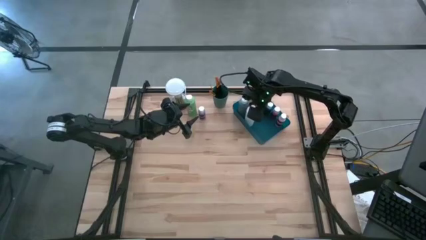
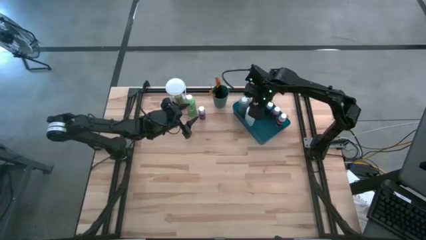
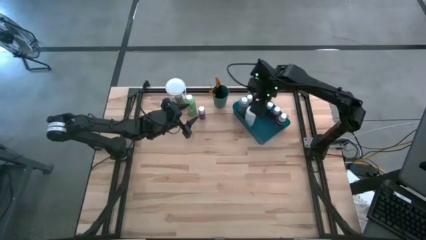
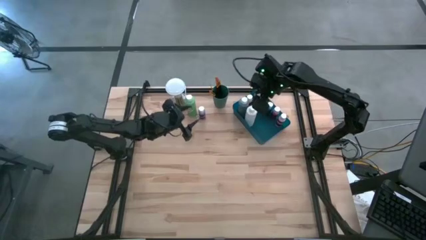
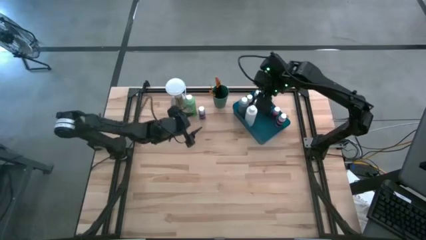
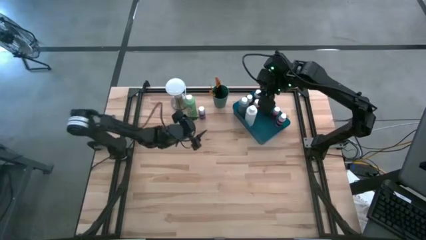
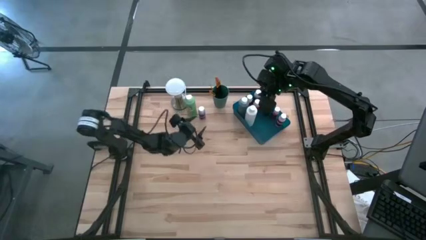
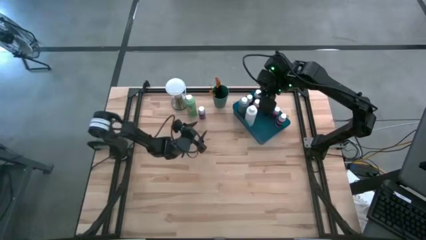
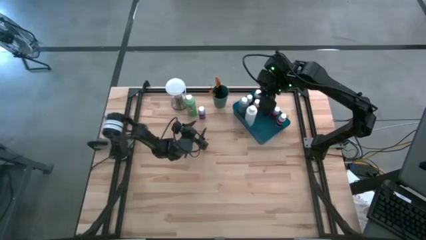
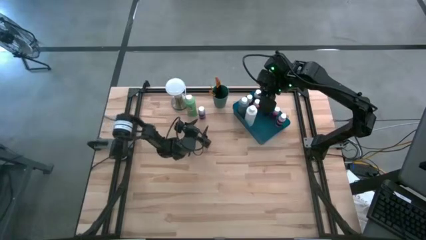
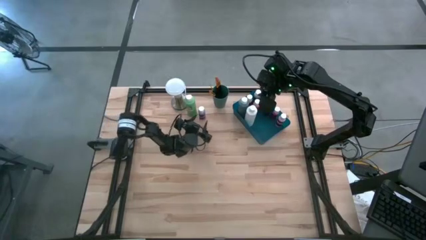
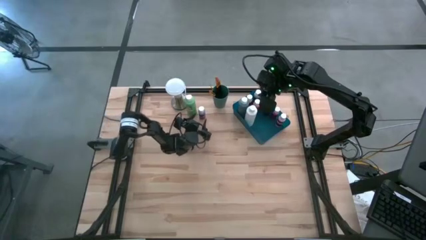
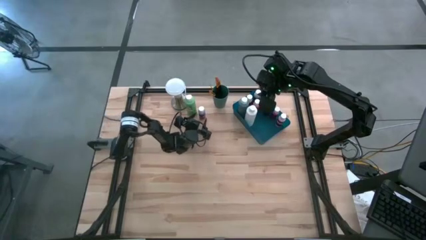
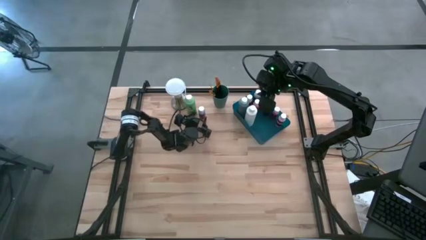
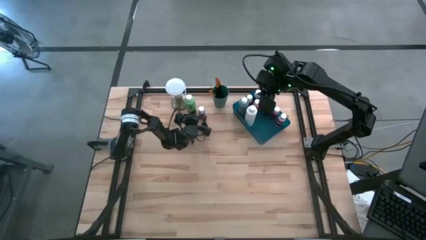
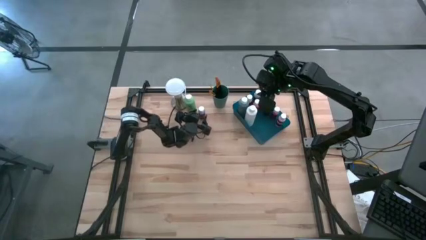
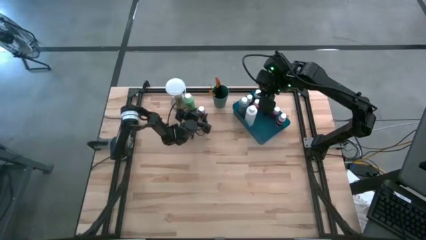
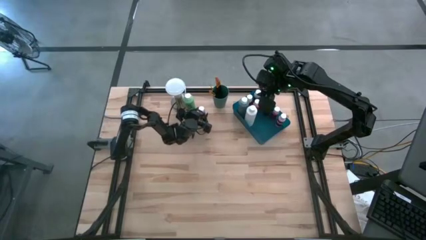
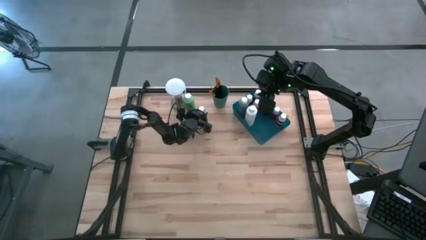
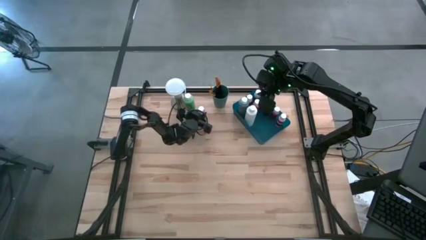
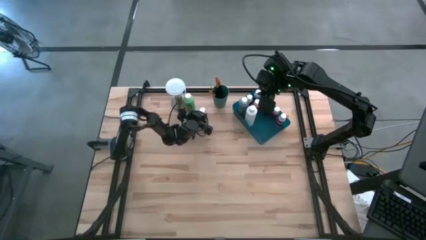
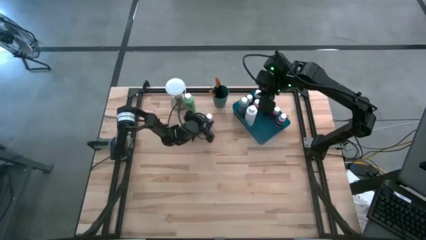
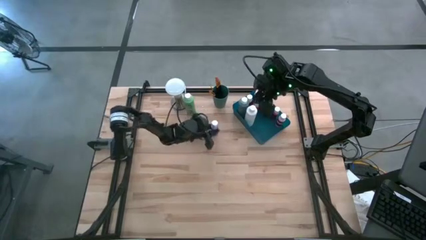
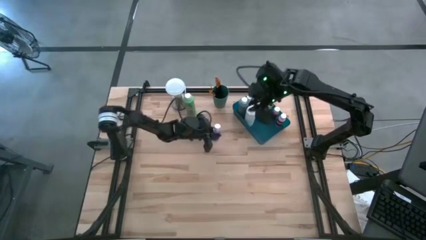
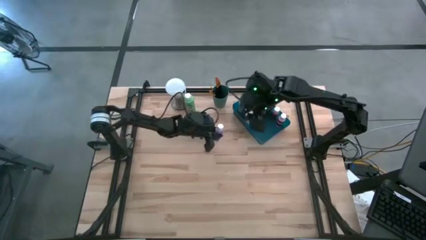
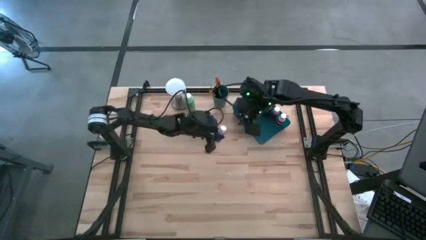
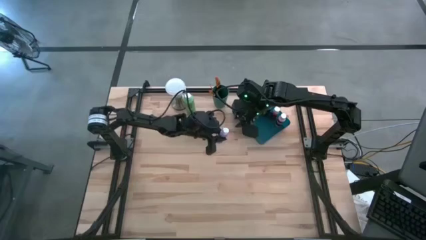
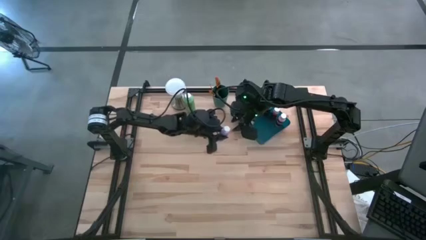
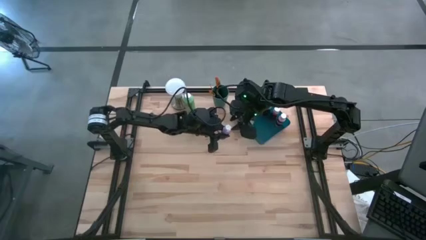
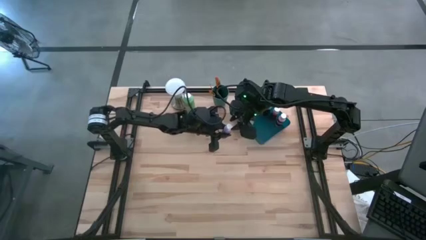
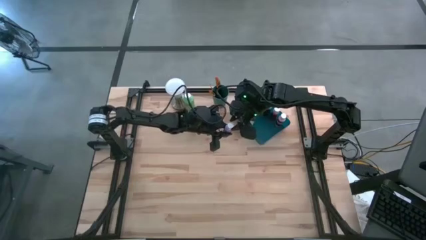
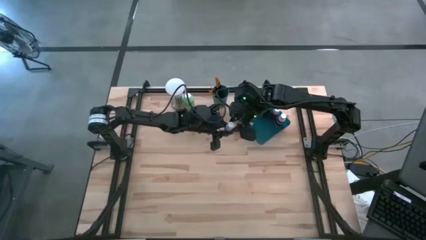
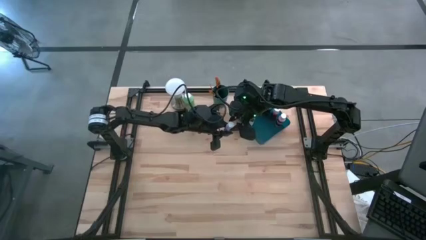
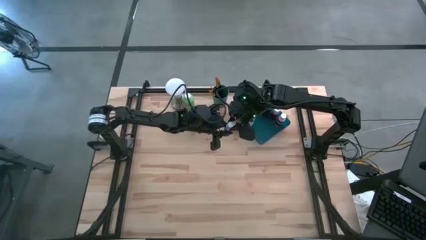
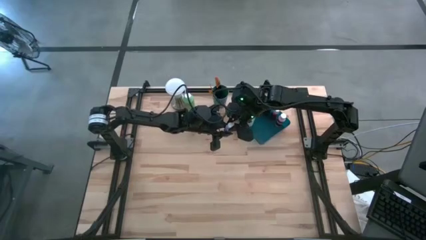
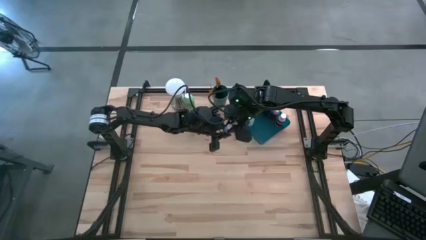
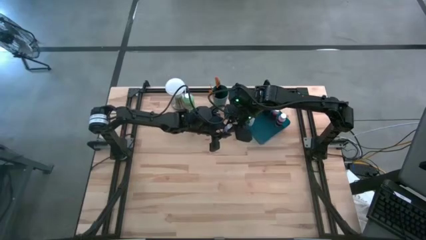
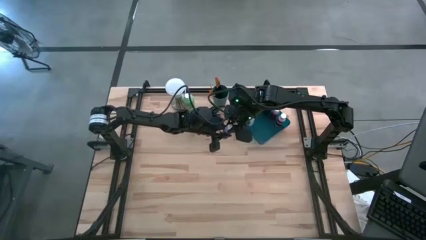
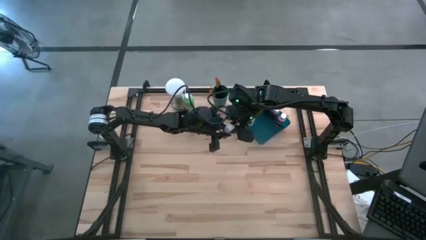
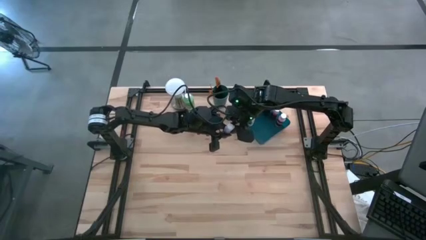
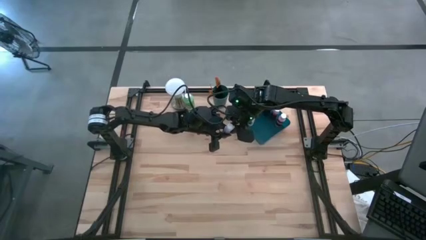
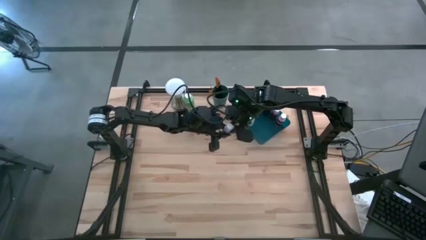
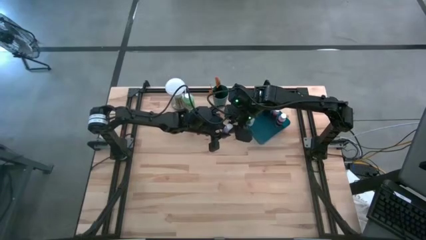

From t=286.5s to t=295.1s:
Task: Pick & Place Paint Supplies
Put the purple paint bottle into the blue bin

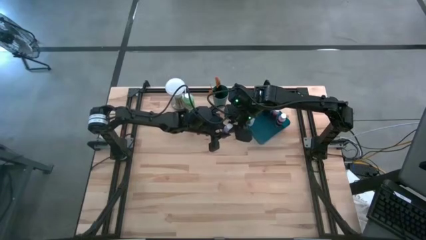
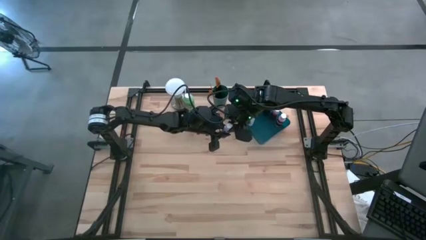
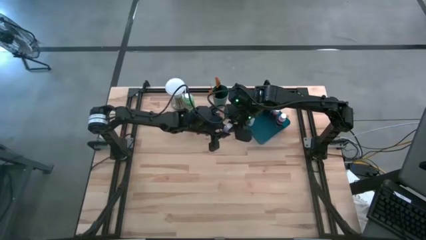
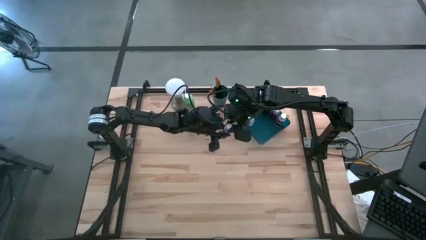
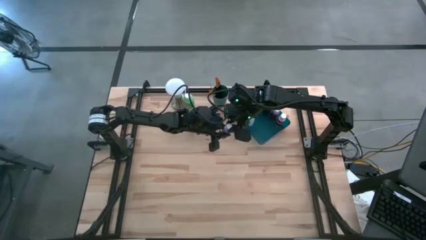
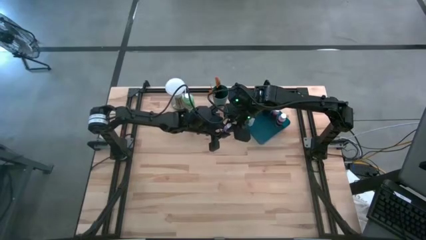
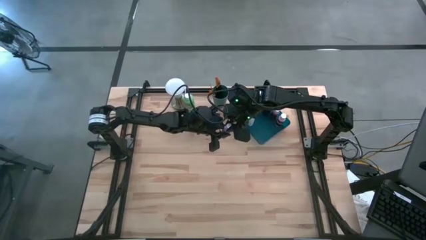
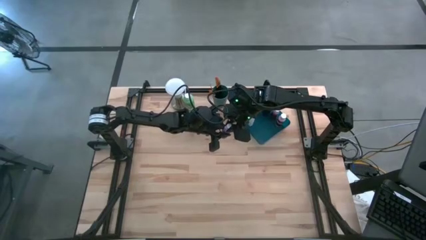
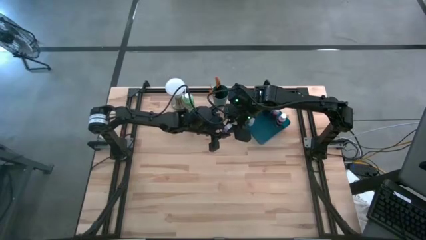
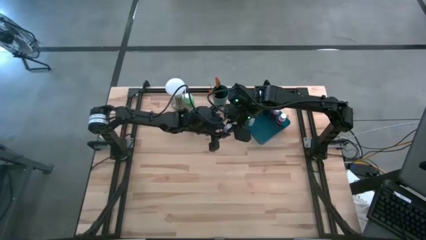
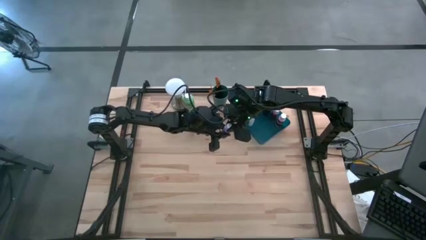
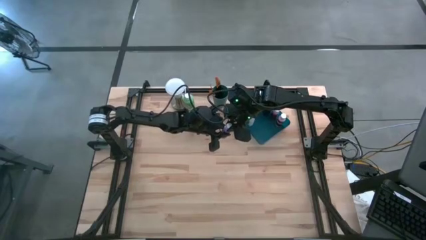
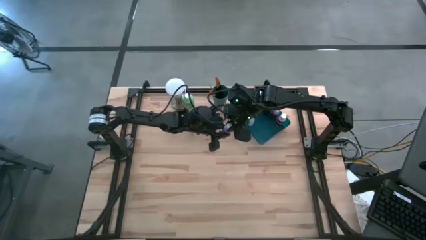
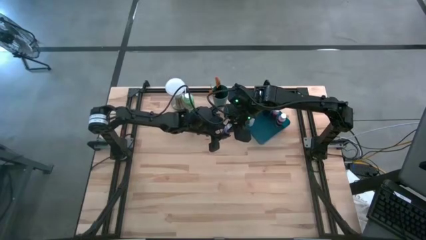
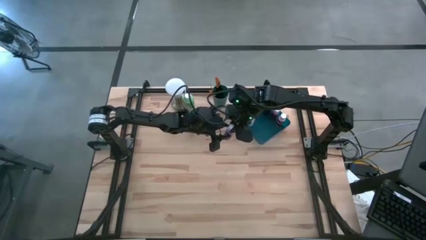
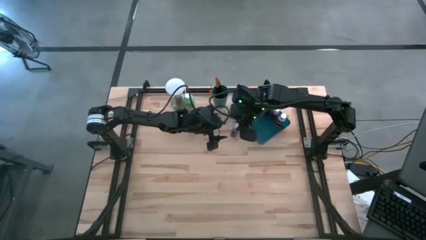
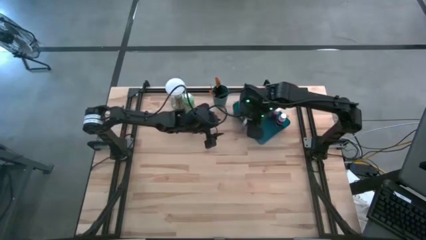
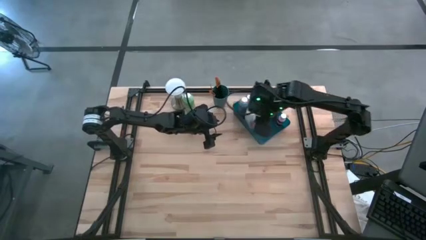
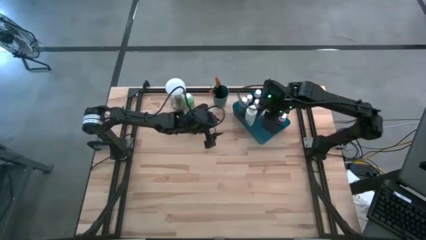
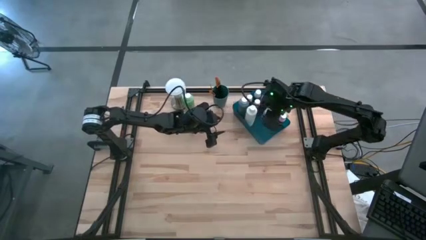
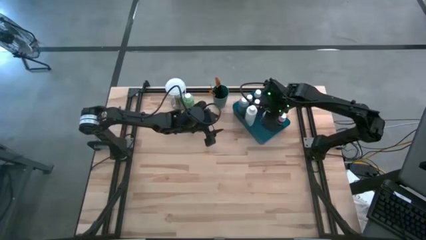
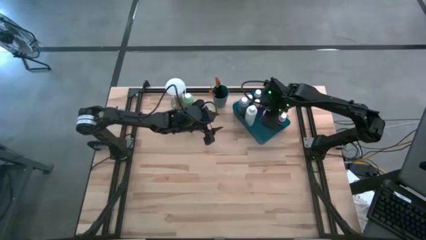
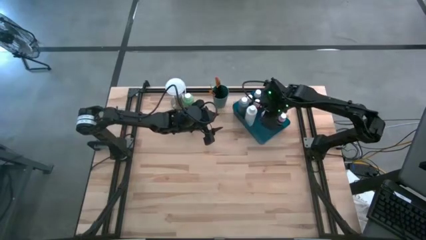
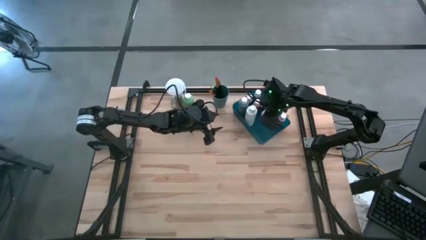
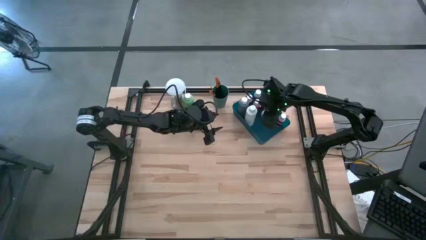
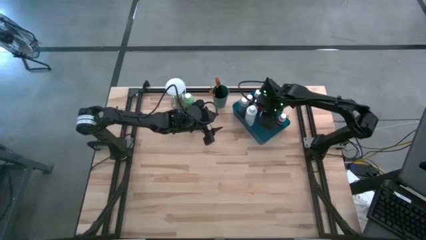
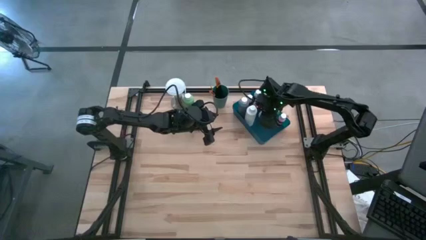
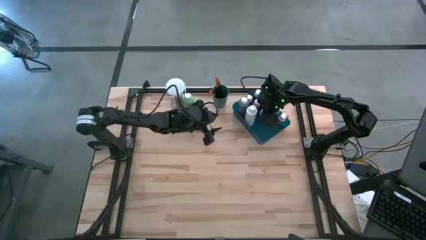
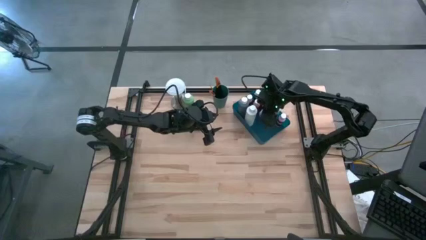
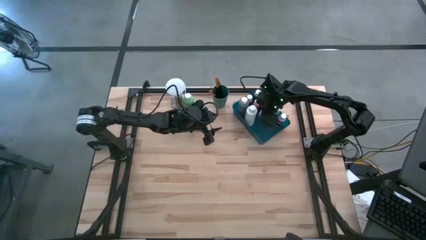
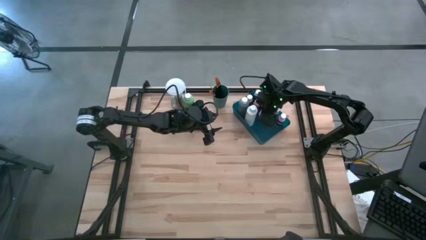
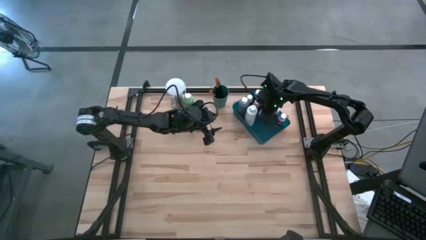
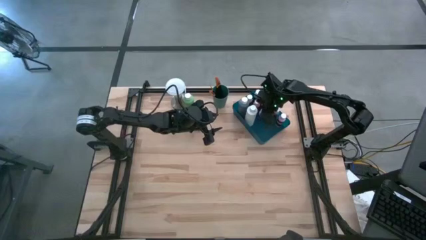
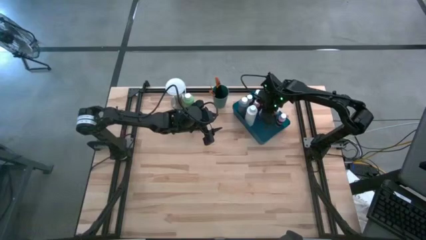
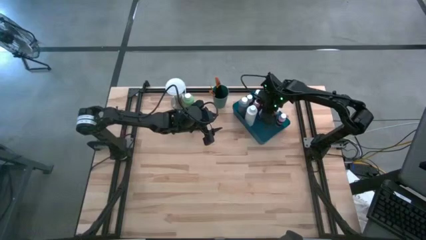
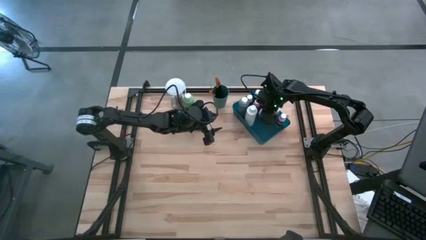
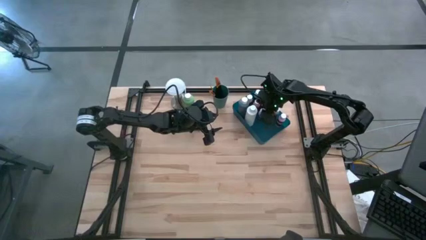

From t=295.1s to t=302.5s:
Put the purple paint bottle into the blue bin
